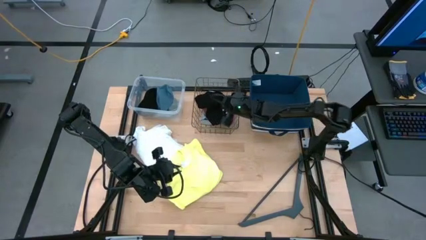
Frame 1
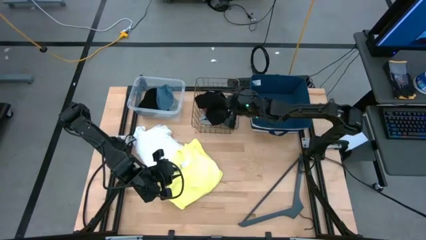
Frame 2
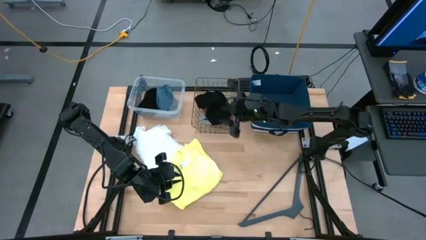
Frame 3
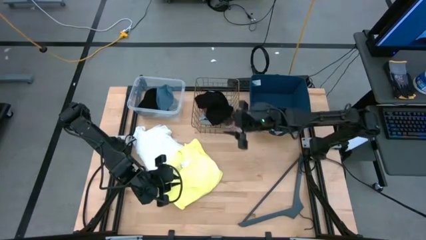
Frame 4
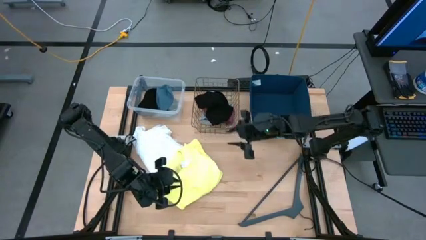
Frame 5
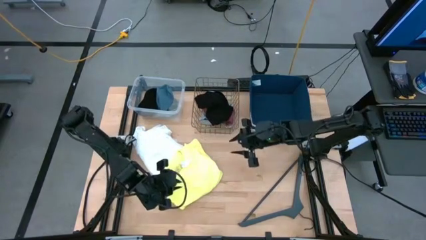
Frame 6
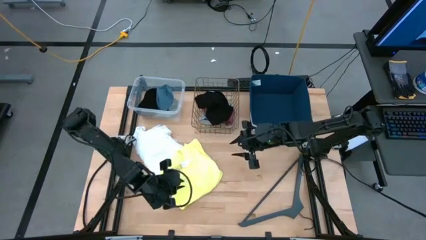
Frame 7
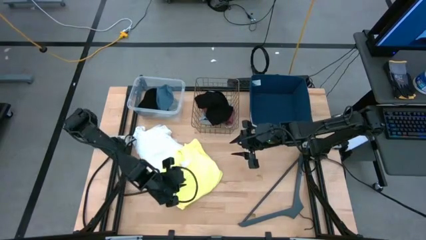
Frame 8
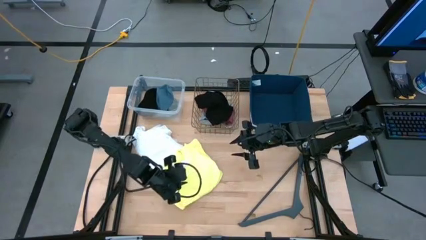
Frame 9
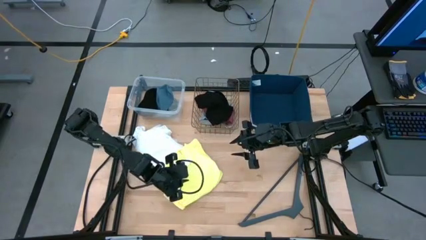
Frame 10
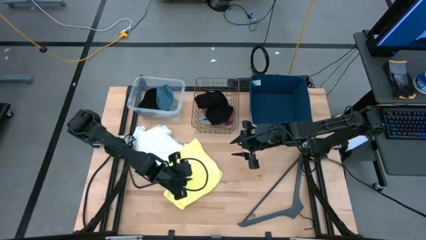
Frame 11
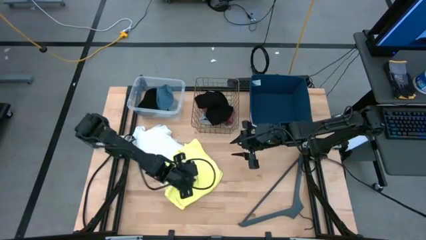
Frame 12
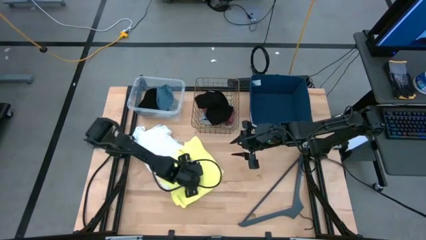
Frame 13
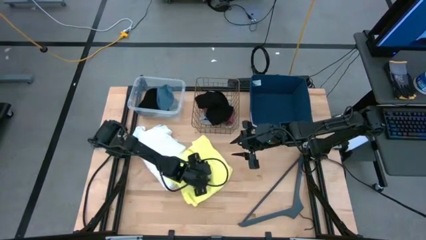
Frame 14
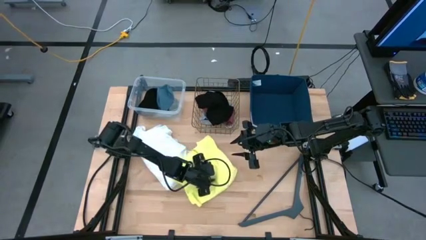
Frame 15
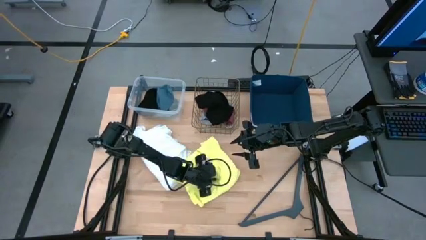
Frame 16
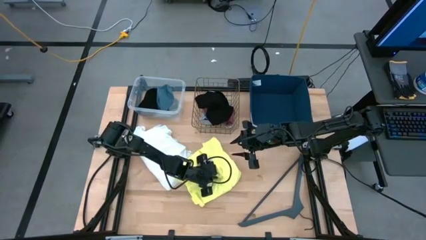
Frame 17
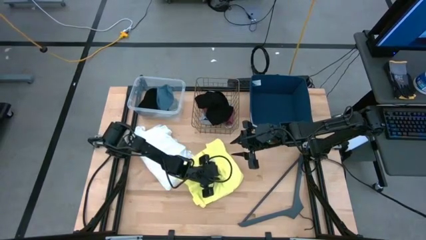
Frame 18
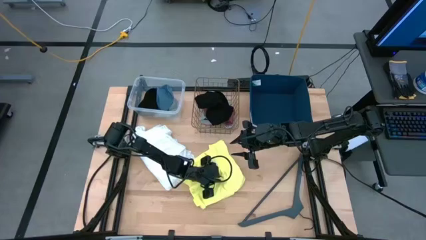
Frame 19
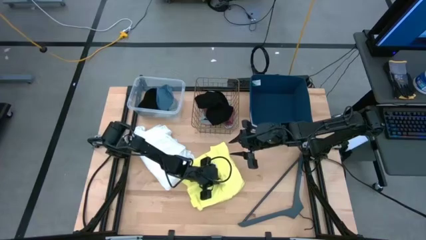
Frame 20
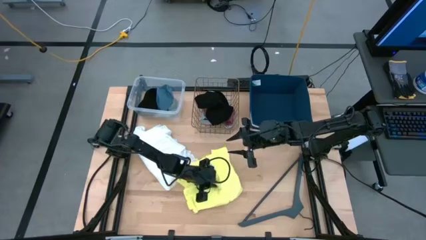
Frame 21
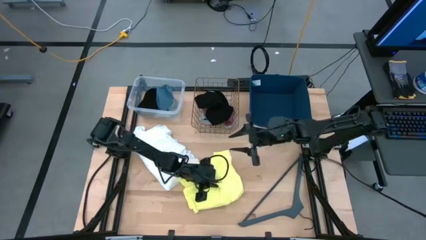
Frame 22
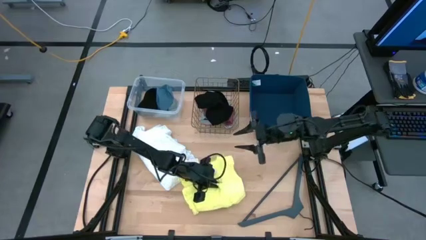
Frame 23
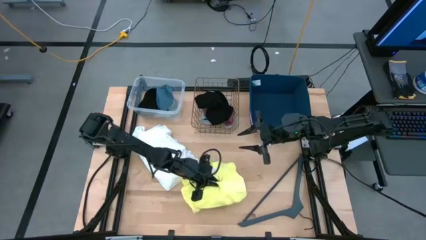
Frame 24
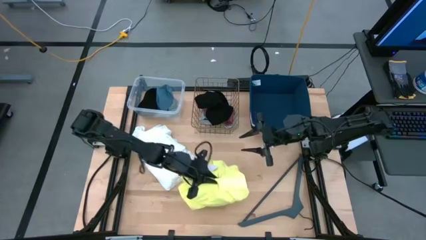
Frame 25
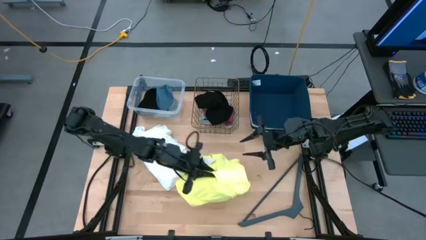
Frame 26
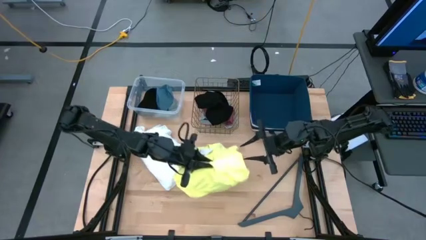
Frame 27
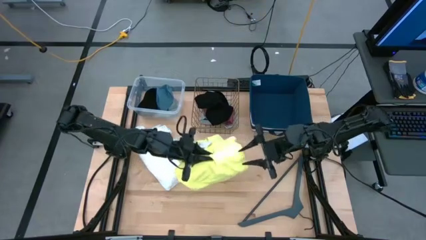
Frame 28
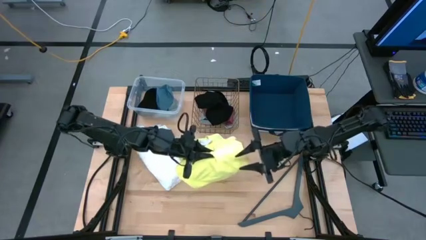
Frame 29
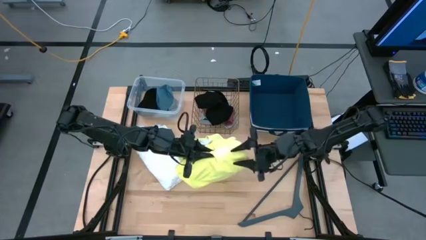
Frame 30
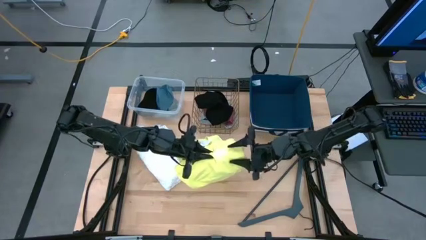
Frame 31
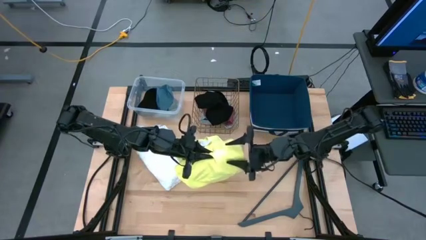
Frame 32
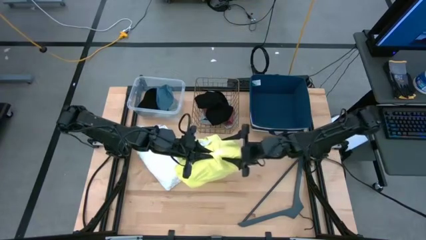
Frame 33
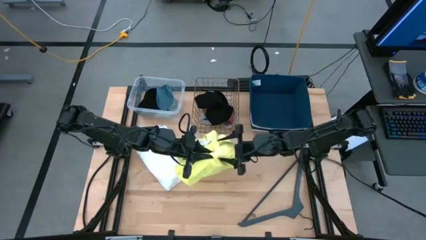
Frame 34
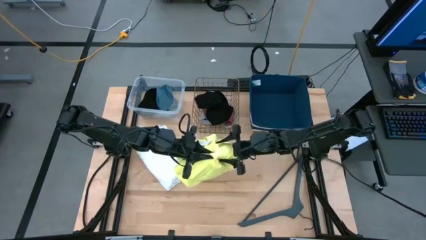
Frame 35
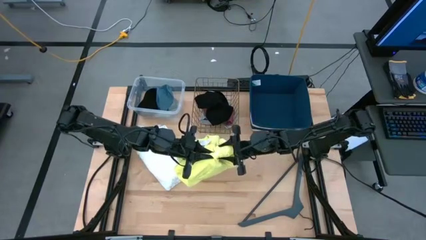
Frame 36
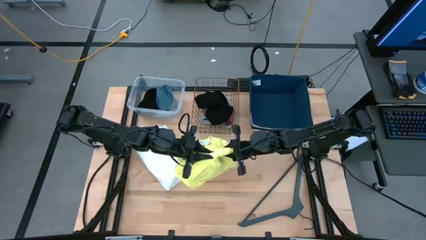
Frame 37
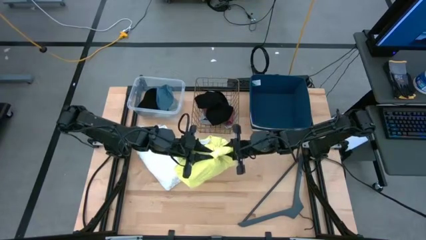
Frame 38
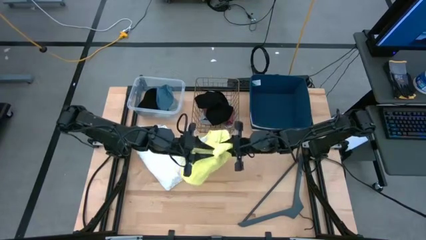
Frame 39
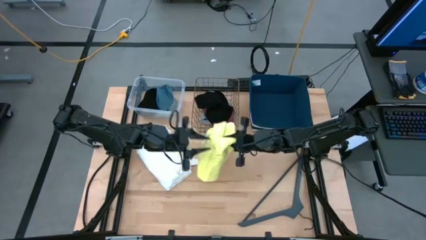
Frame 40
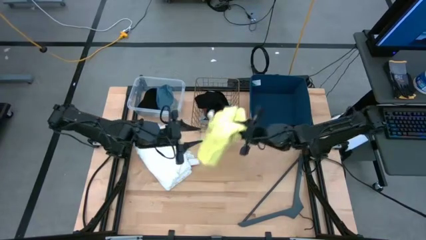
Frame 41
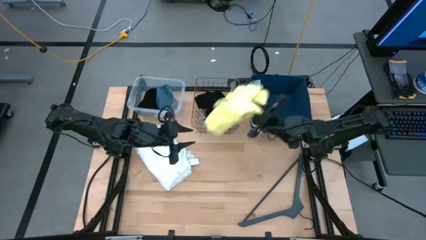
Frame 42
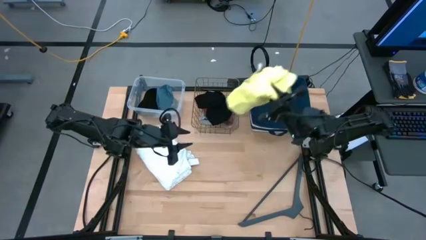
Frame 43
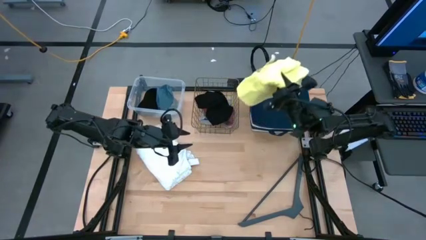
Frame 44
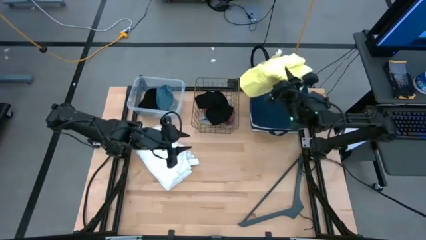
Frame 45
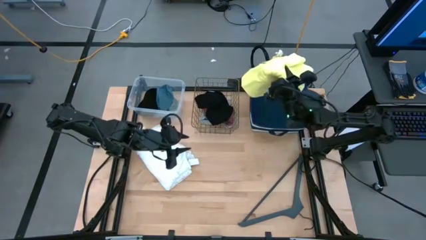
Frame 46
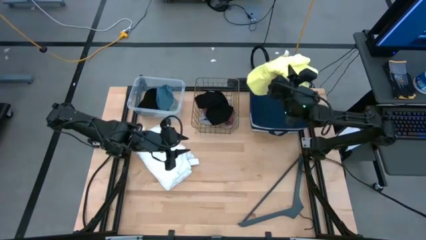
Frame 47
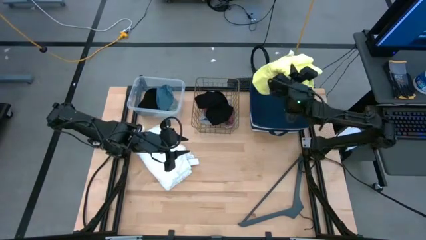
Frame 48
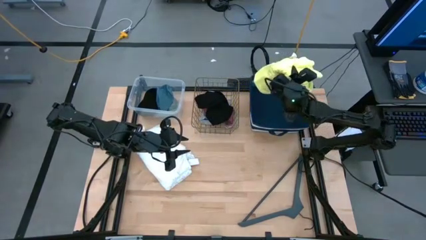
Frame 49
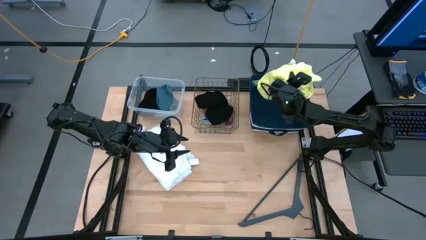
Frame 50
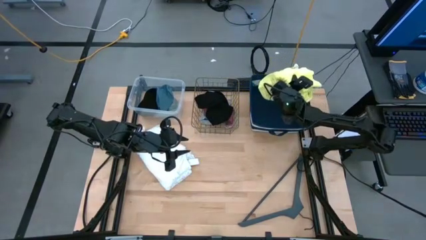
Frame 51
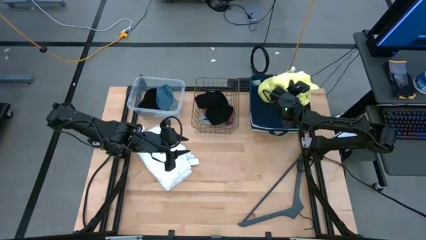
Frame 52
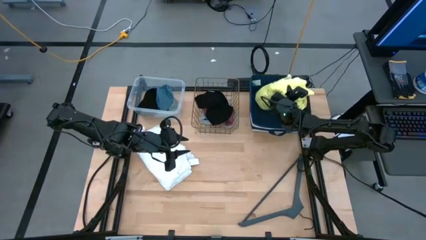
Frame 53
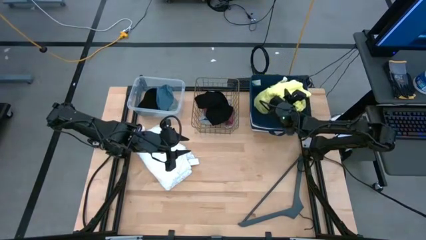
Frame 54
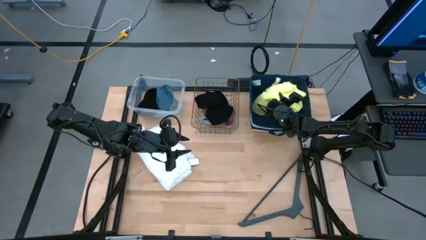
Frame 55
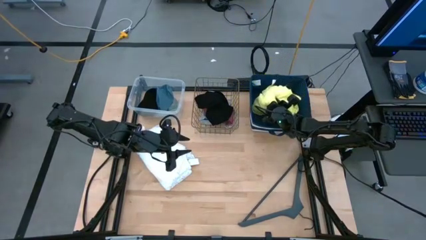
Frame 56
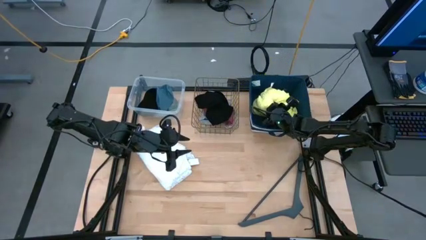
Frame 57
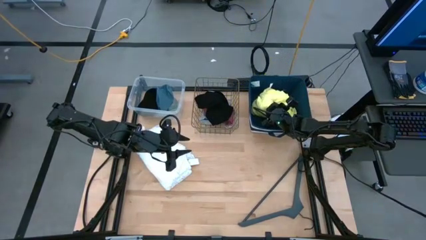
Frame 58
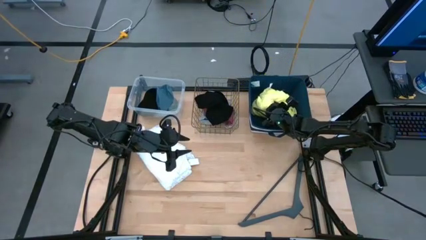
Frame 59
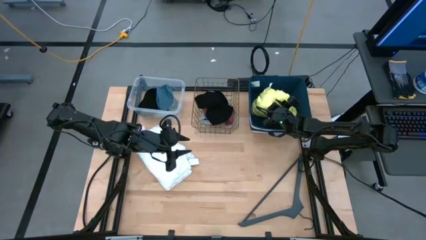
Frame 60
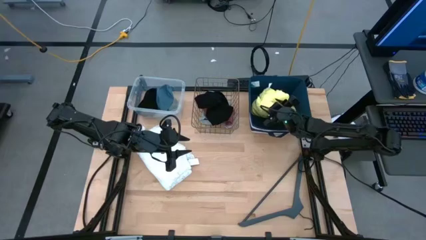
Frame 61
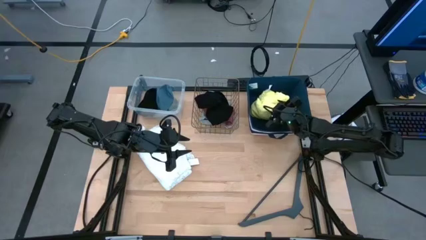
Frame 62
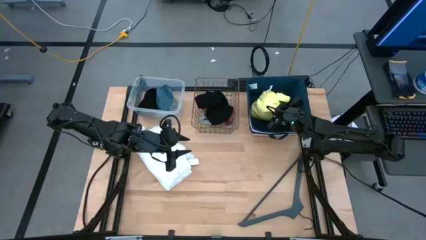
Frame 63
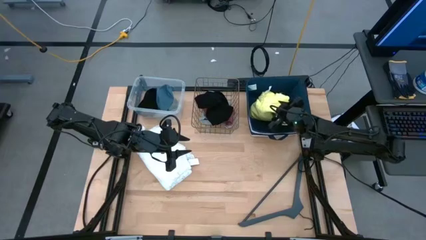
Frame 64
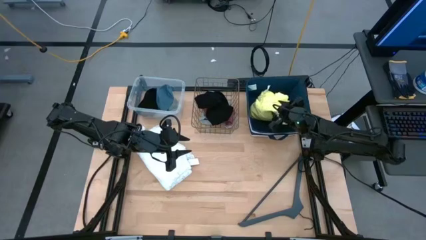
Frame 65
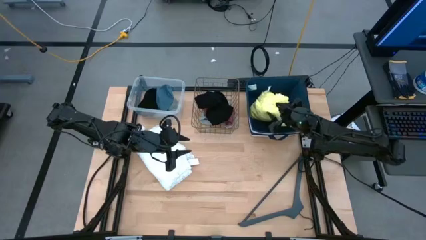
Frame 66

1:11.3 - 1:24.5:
Task: Pick & Place Cloths
Put the yellow shirt into the laundry organizer
